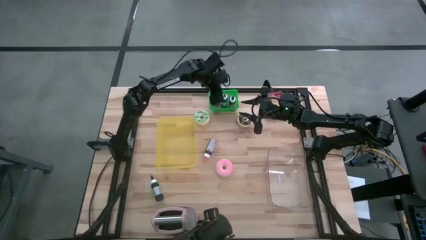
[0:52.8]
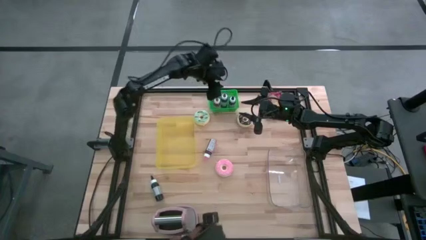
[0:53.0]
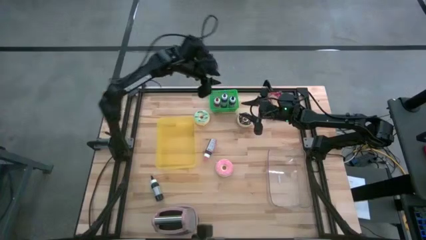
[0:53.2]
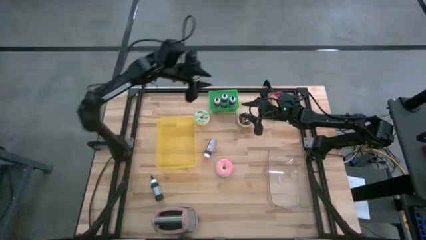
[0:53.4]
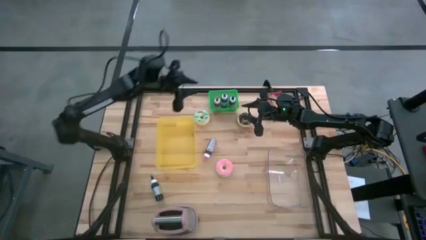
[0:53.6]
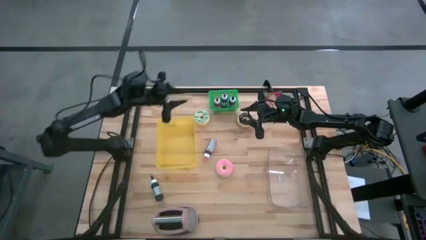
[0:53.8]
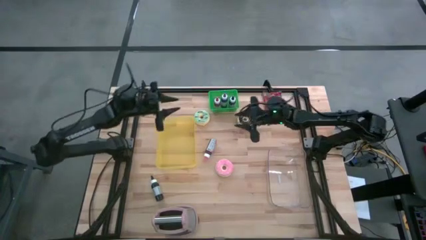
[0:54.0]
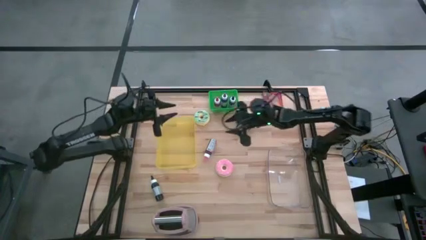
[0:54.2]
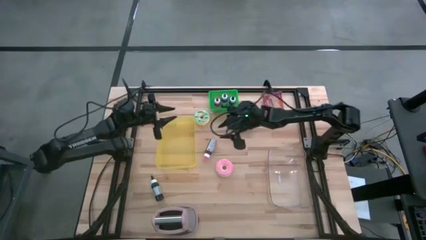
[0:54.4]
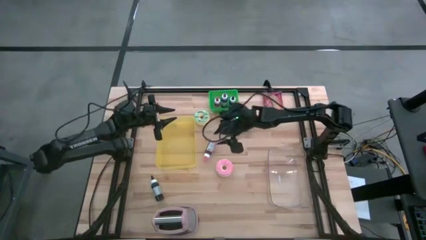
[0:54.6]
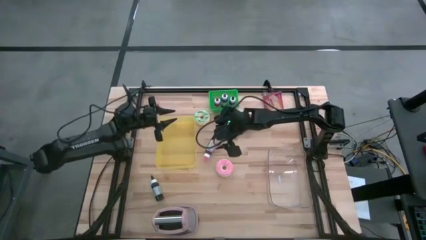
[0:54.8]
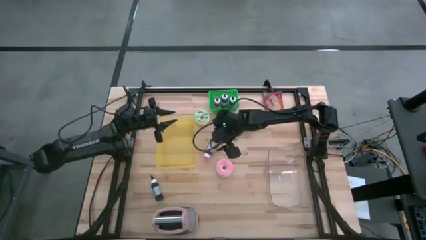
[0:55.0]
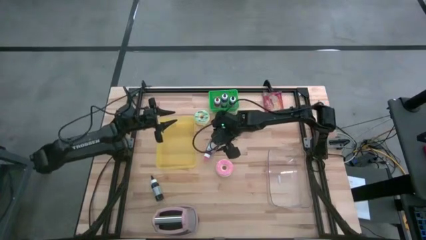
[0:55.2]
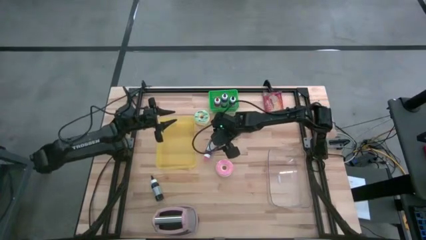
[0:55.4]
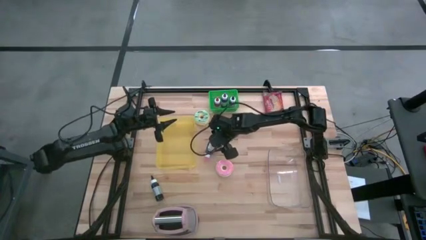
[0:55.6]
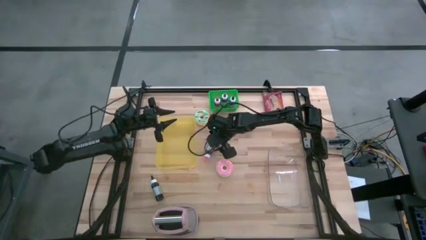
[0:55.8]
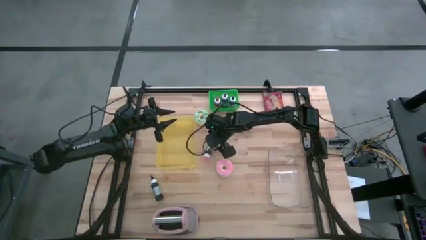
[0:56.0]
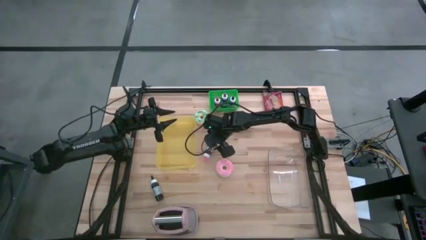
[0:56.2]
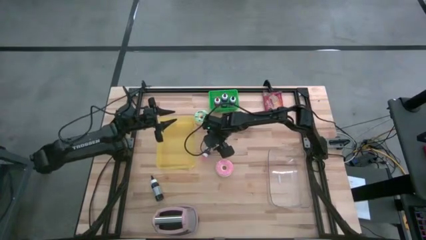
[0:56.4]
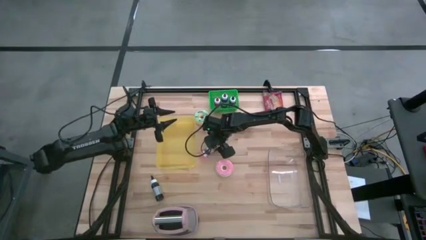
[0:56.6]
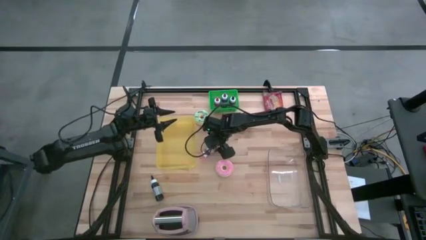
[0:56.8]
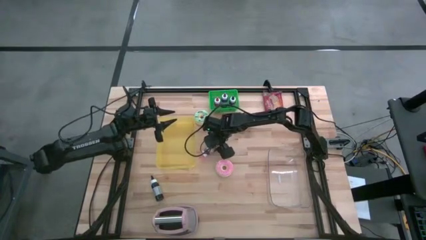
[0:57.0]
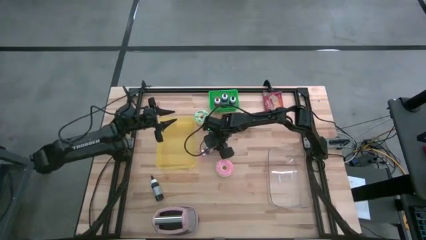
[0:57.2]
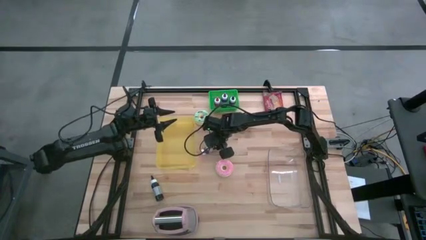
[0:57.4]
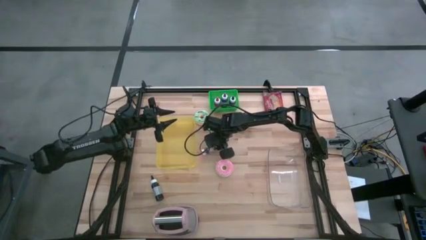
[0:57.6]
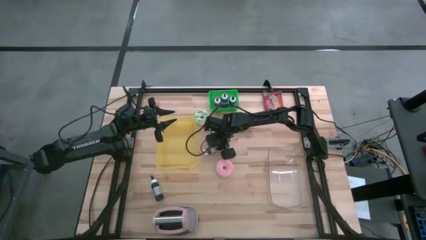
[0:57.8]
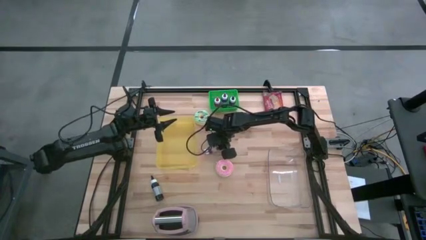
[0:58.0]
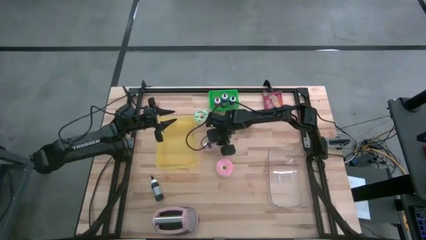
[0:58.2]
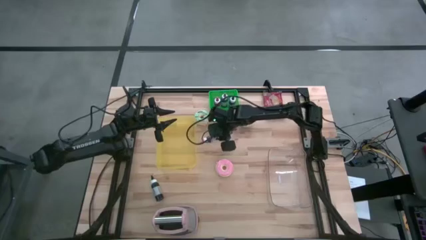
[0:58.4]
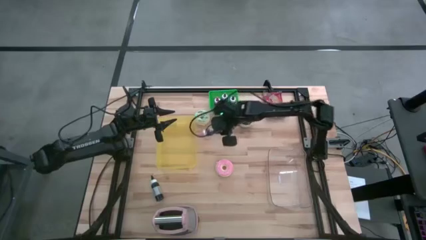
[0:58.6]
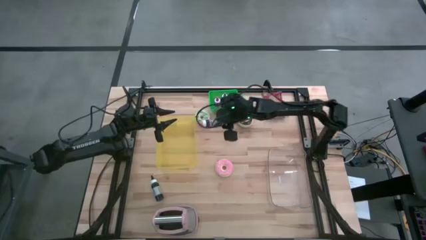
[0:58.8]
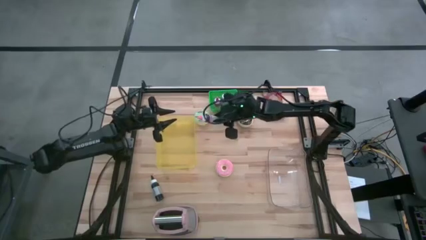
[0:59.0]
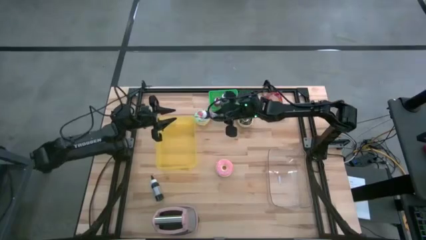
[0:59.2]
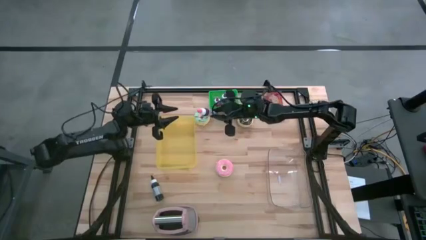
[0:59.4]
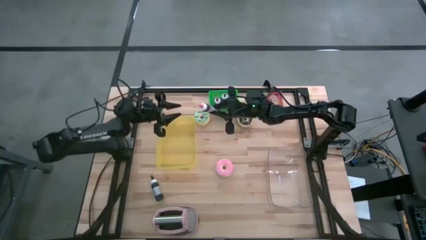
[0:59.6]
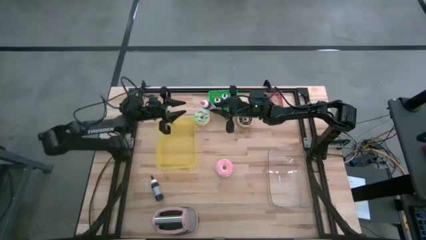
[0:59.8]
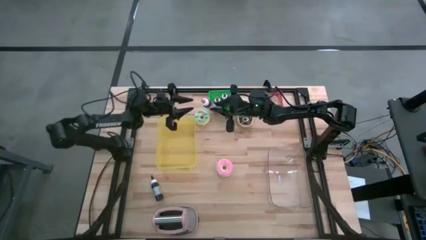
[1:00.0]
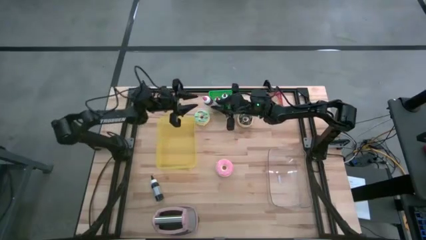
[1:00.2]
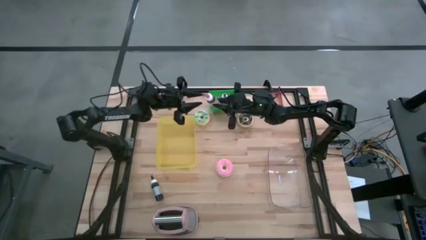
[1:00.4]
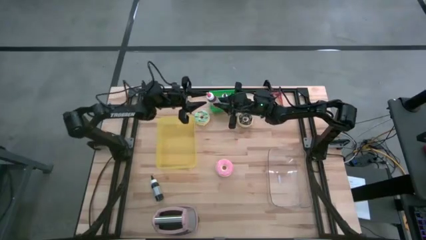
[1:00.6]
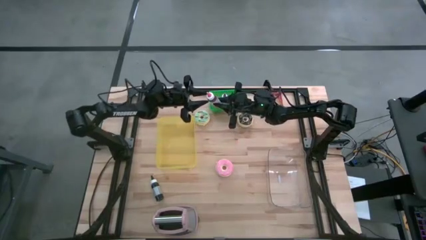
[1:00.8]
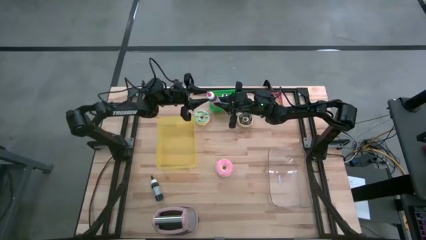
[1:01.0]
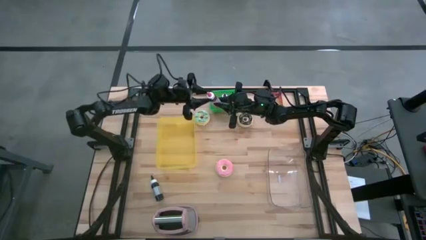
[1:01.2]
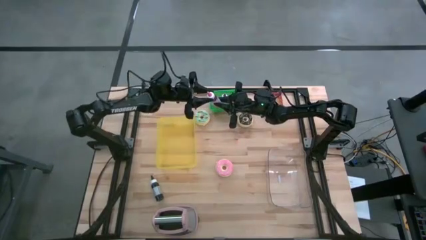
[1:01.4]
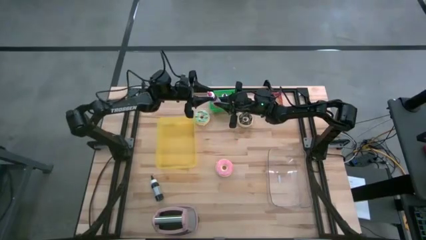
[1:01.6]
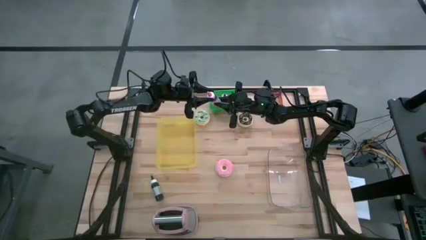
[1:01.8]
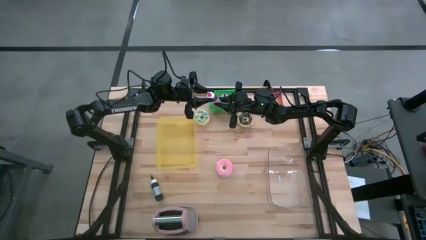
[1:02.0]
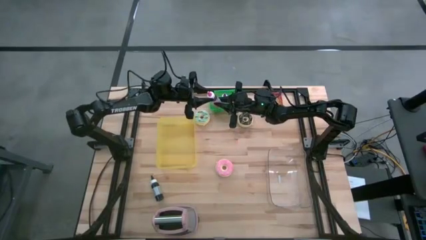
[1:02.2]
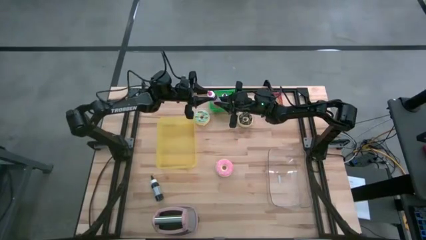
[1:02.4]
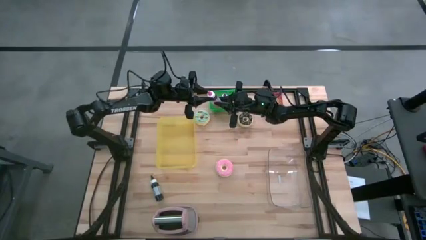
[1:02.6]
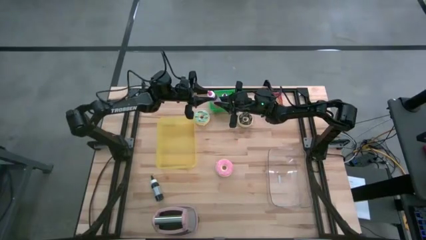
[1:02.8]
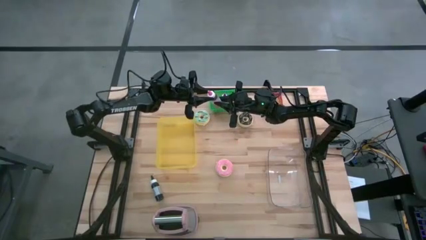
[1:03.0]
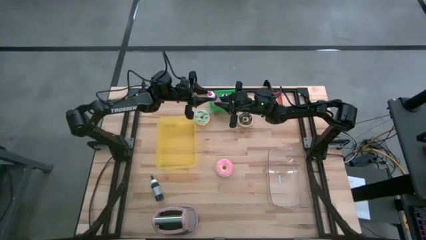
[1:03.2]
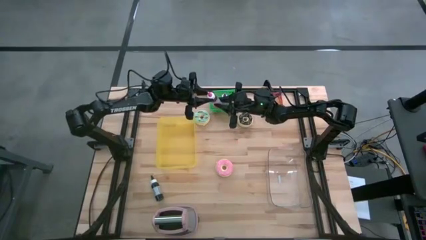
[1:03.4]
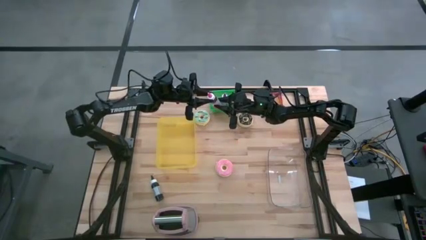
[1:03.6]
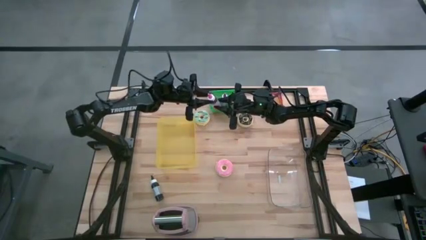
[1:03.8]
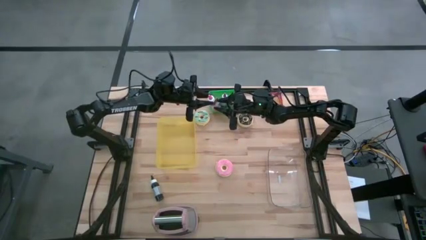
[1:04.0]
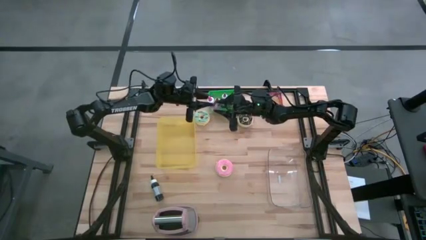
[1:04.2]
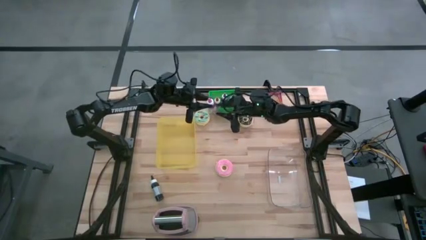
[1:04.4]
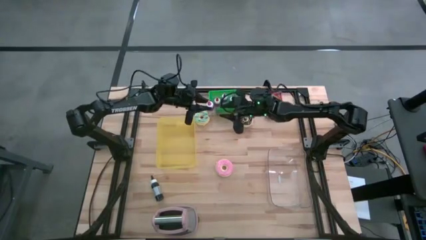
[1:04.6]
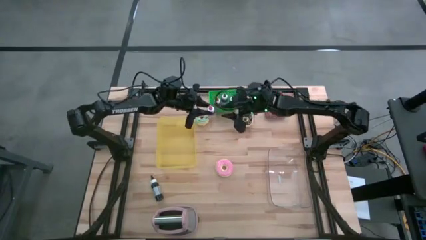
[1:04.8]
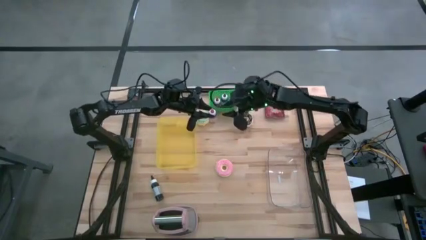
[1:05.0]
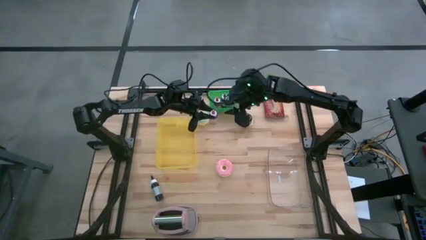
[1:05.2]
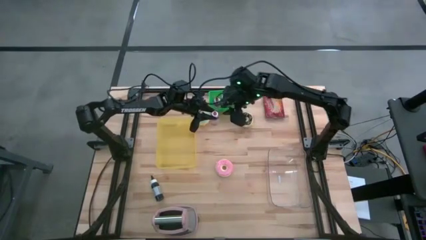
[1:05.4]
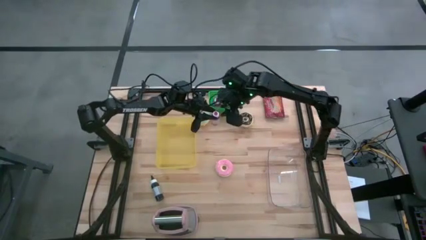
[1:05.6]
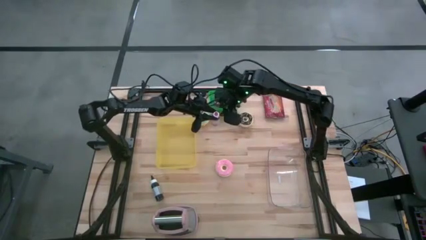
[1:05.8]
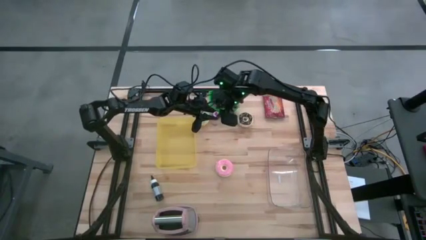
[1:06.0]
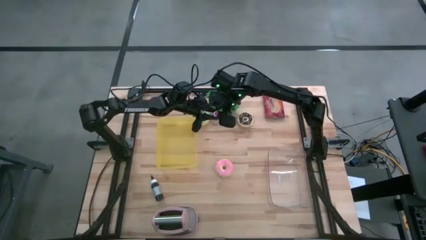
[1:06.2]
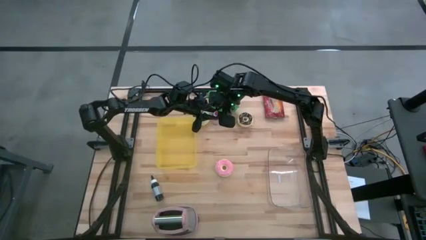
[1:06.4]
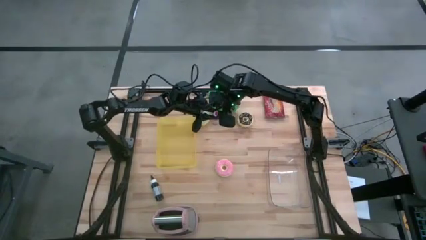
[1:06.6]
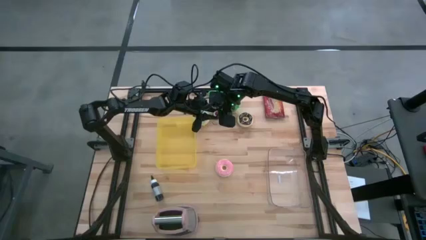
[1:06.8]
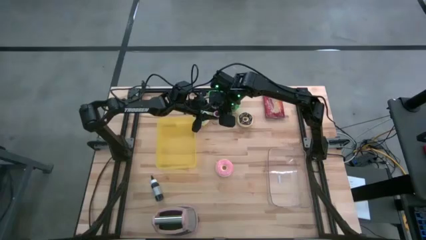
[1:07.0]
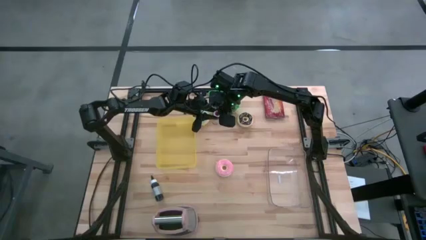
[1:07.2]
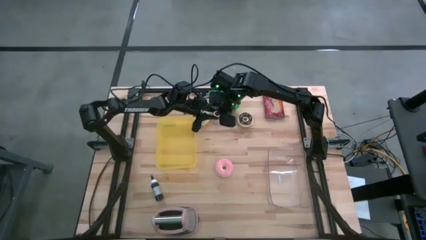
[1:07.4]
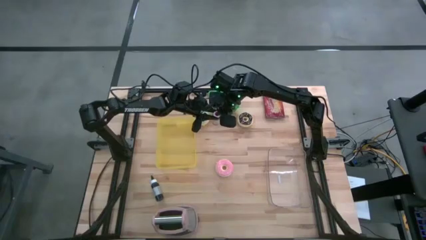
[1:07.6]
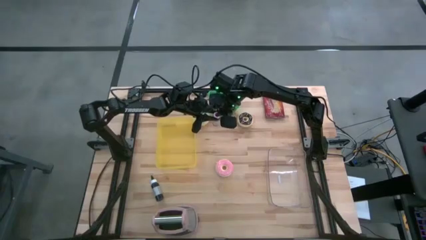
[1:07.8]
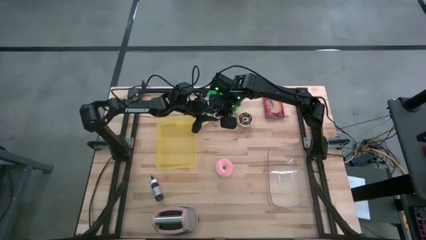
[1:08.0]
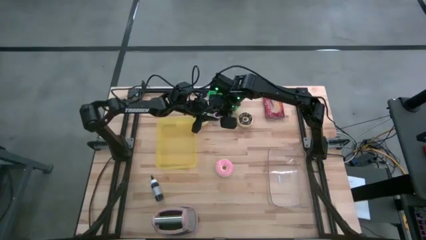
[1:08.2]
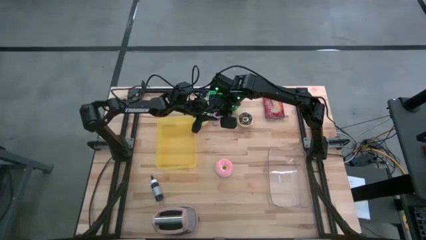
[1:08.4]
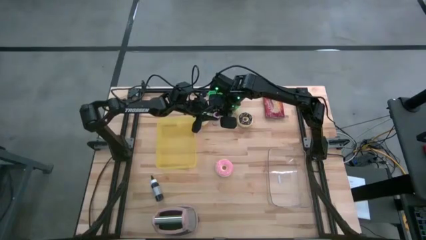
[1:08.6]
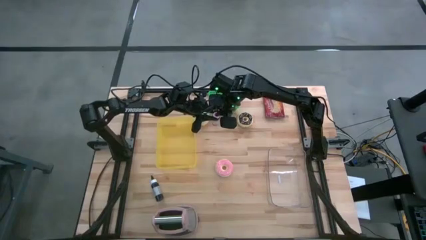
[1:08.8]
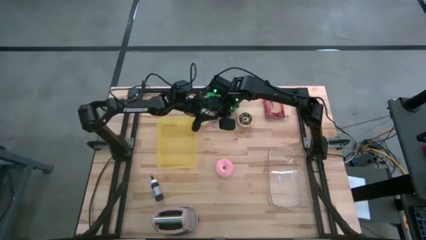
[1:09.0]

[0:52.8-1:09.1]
Task: Pick & Place Food Item
Put the pink food coloring bottle into the green bin

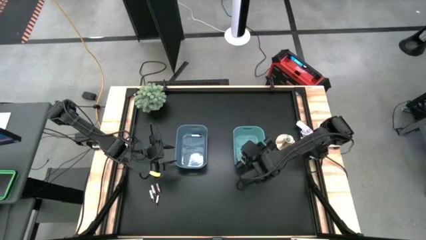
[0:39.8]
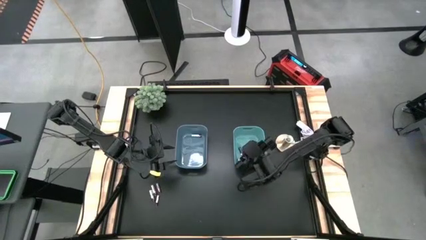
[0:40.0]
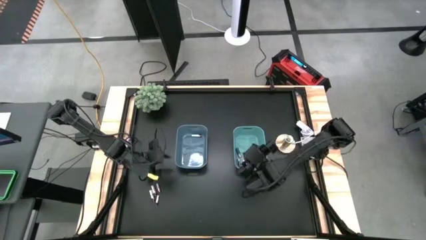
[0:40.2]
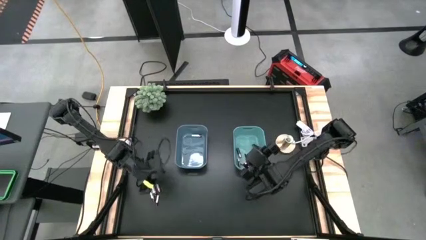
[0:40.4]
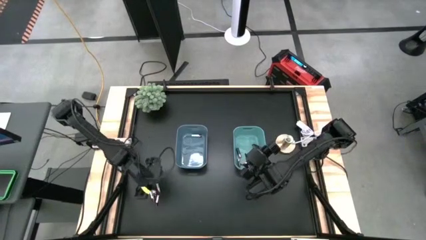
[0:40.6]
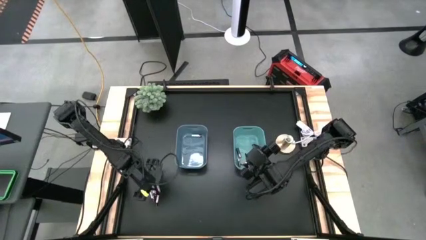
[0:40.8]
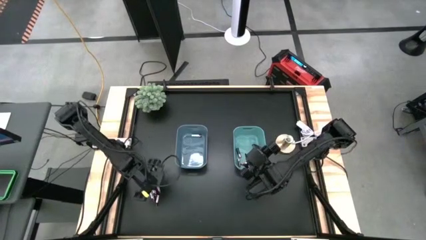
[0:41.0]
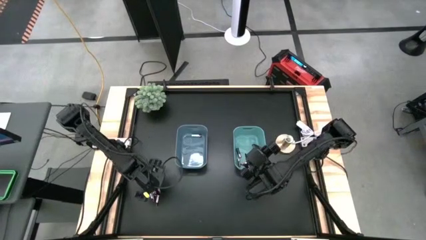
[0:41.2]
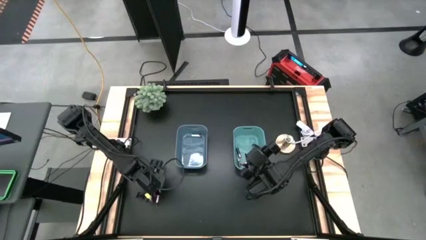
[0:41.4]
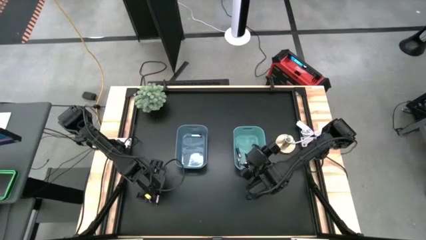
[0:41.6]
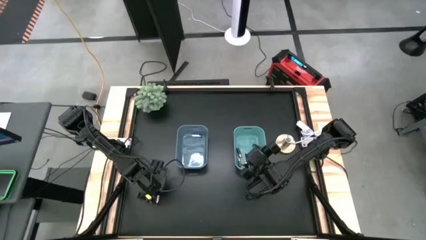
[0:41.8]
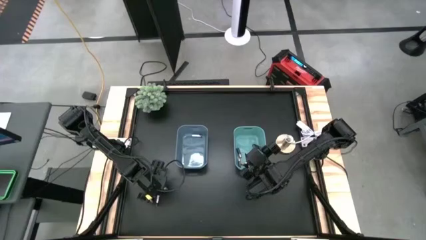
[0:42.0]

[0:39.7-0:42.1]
Task: Sort batteries
Put the small silver battery into the blue bin
